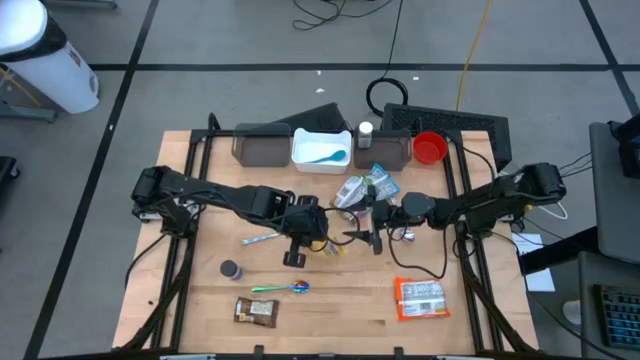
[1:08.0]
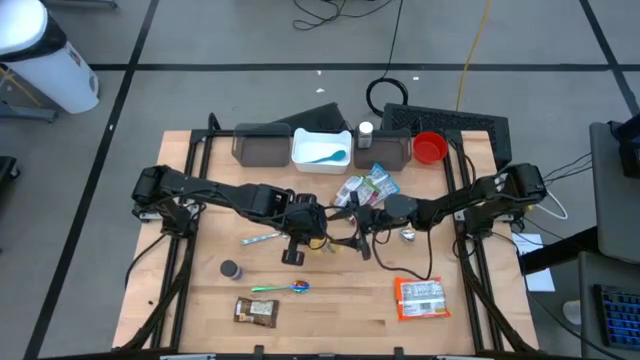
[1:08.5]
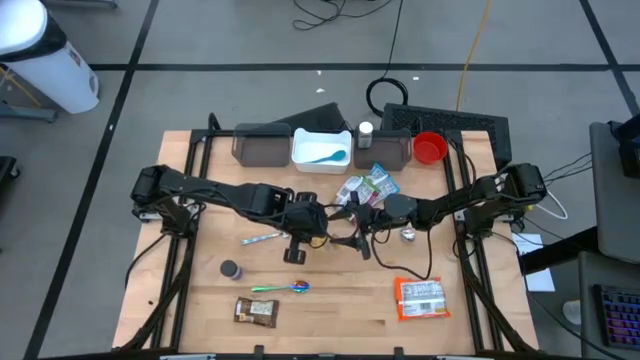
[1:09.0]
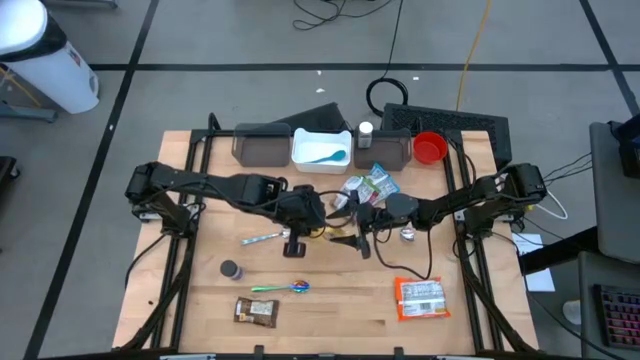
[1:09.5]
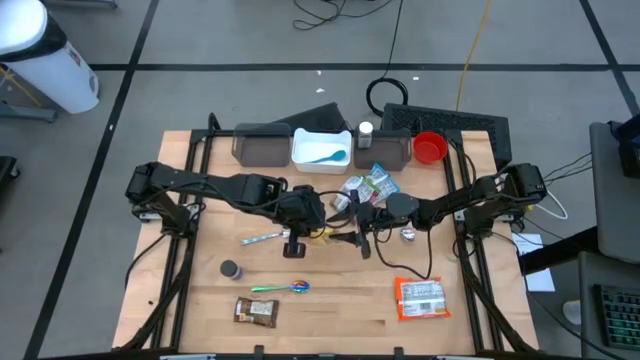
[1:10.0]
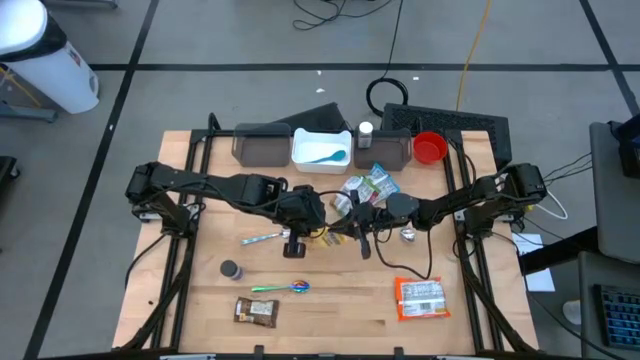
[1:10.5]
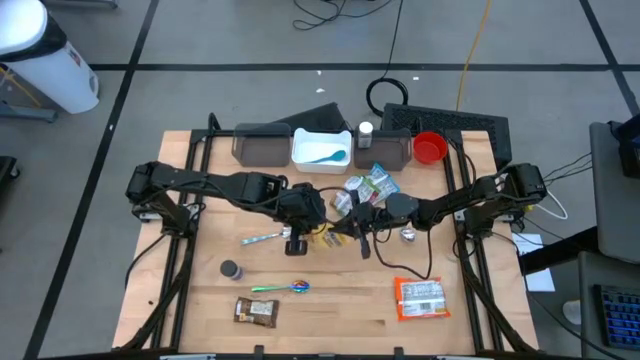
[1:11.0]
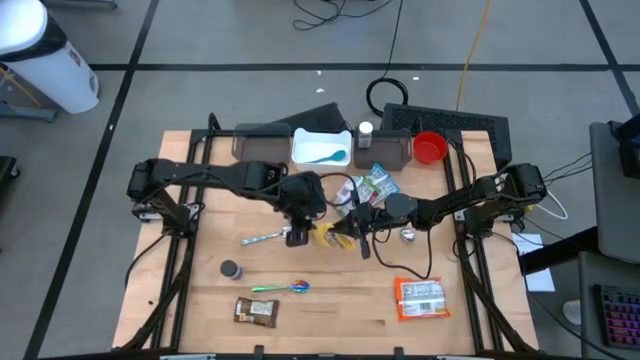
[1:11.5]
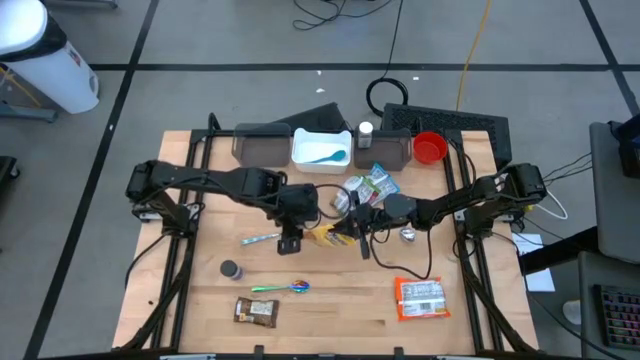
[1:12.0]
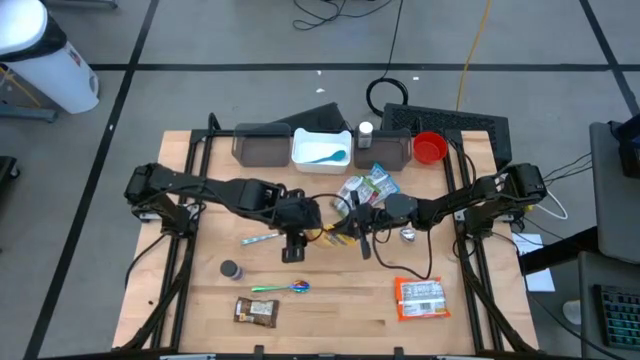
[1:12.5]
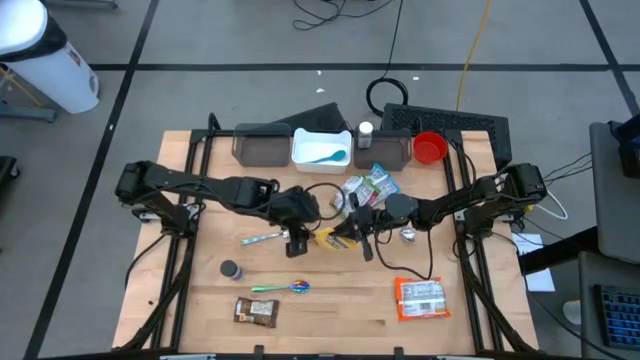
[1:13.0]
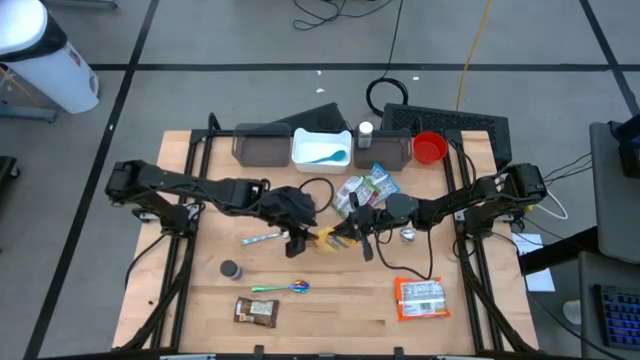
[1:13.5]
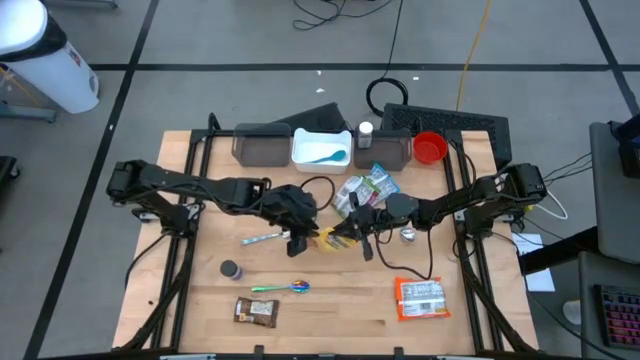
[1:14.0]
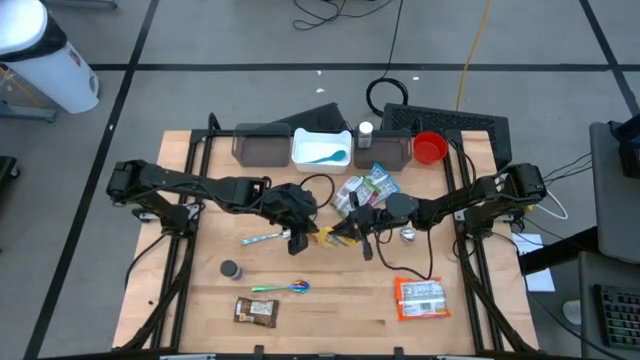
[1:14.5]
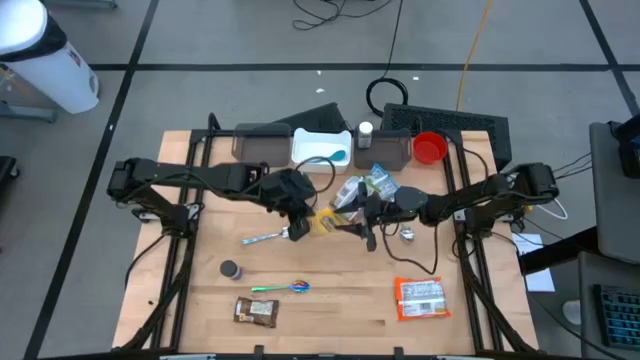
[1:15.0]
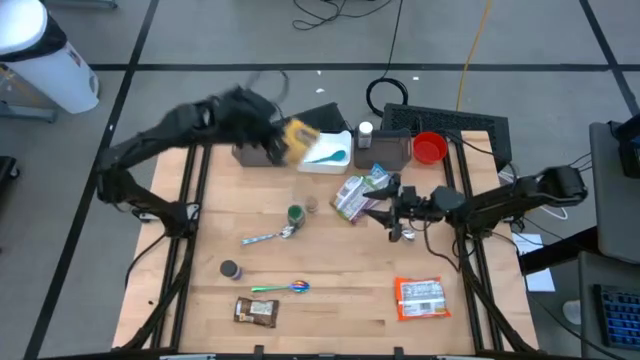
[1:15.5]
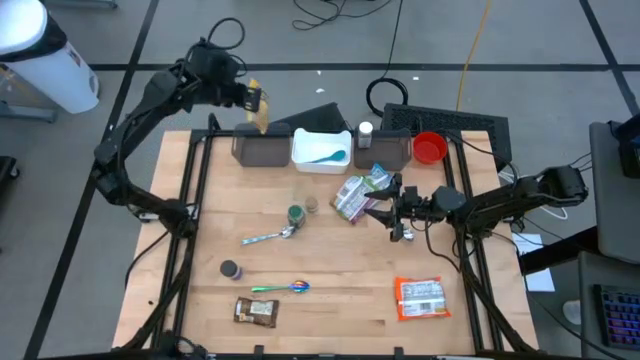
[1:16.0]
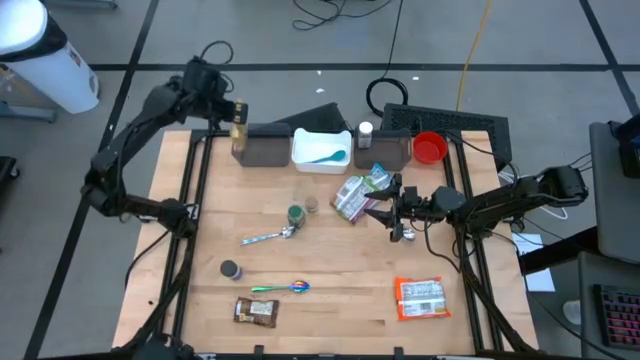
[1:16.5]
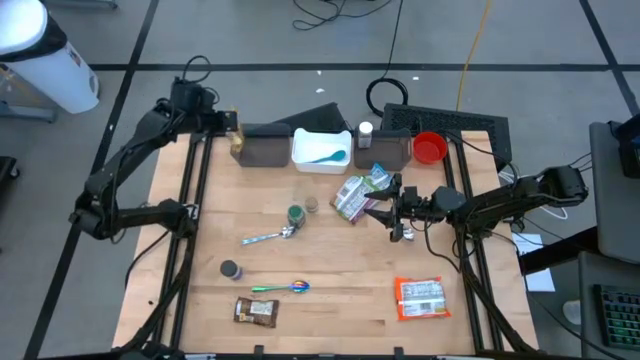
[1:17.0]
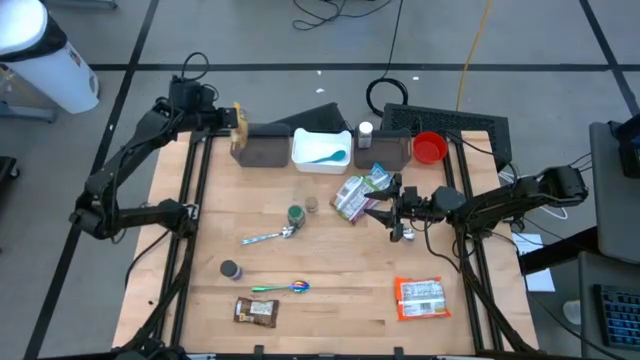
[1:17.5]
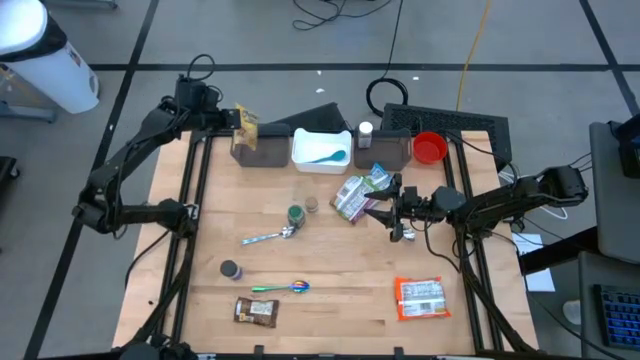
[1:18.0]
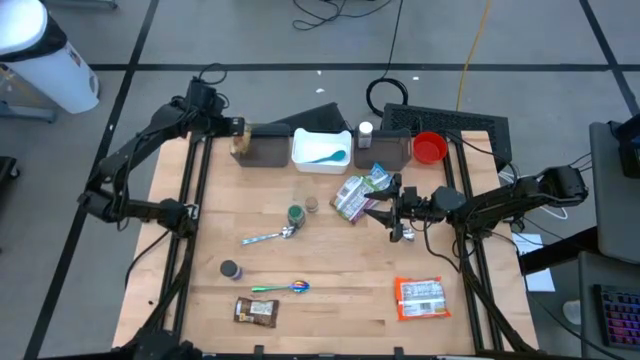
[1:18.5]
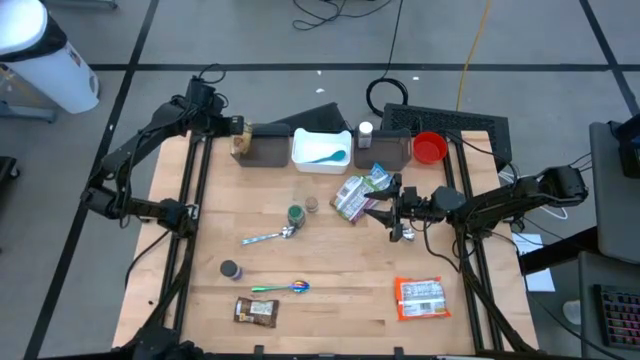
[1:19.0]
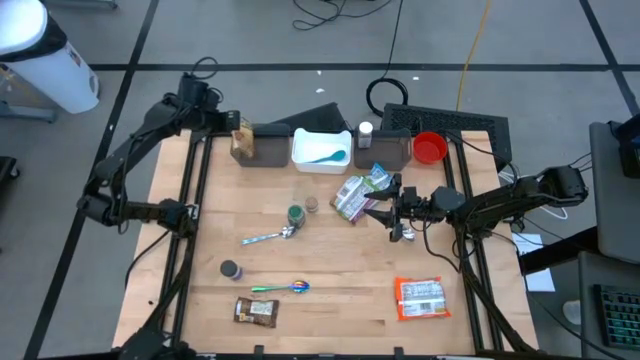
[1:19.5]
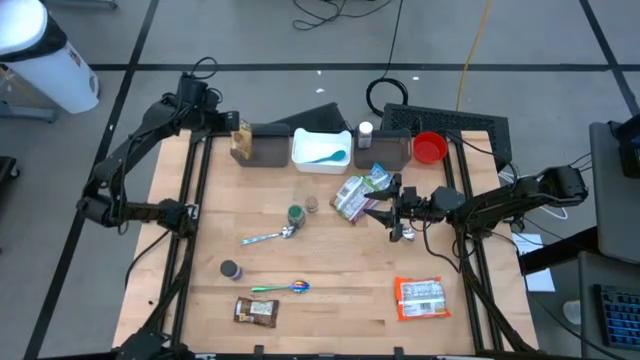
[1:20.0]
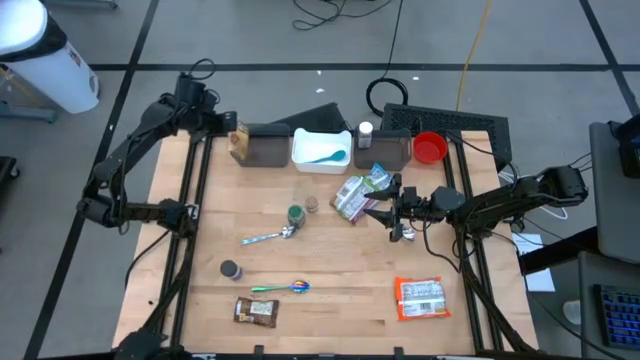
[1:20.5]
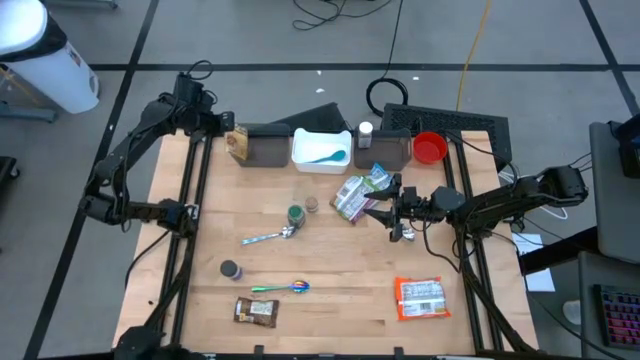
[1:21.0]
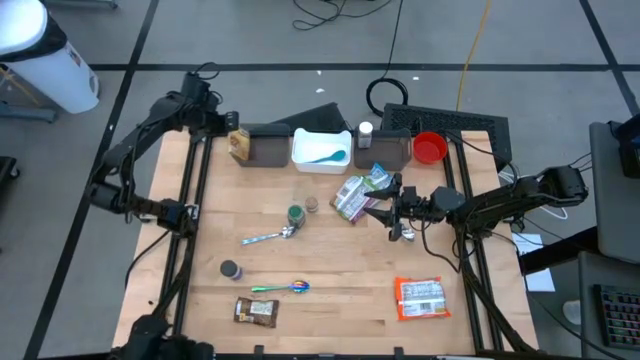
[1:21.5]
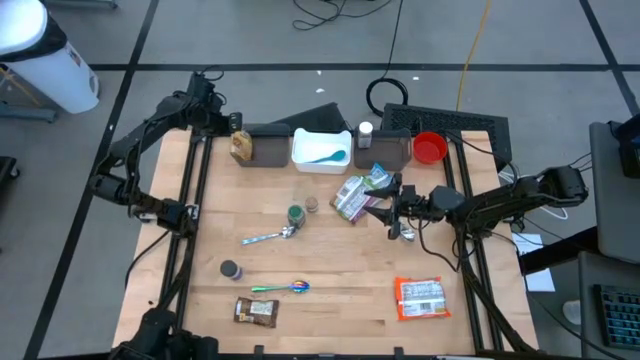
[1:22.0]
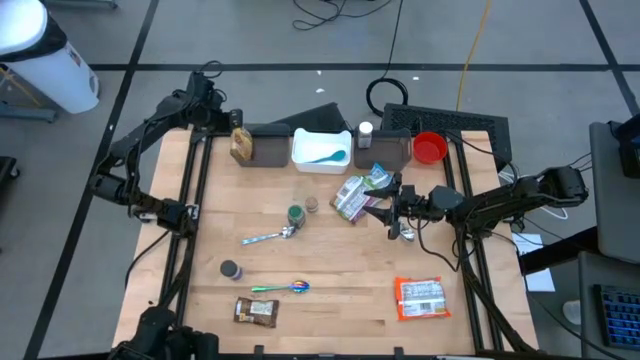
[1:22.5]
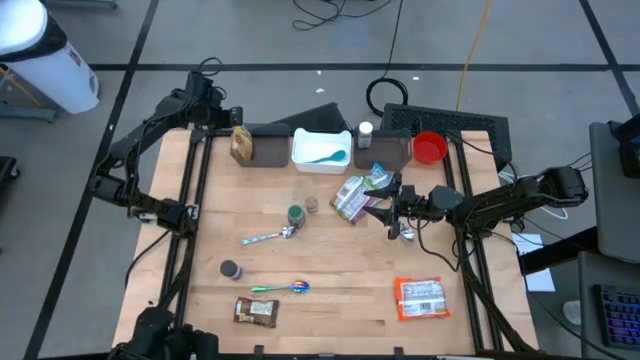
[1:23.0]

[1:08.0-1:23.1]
Task: Pick & Place Food Item
Put the yellow noodle pack into the left black bin

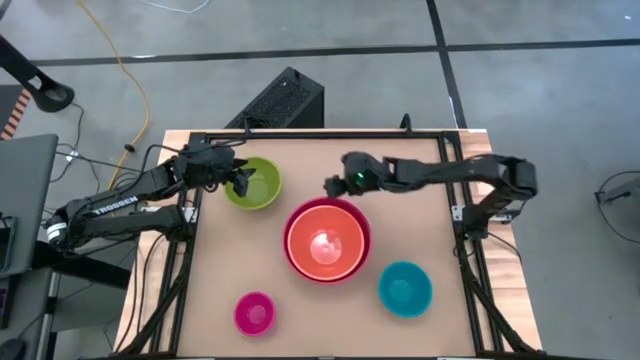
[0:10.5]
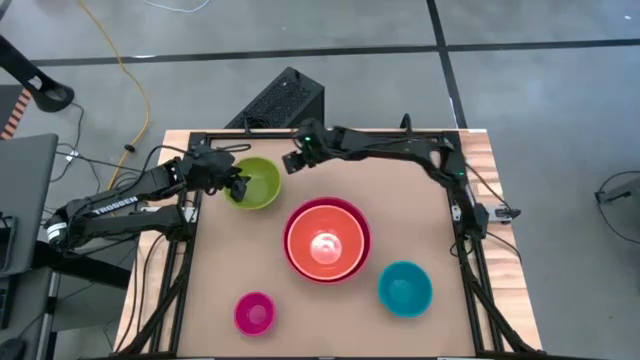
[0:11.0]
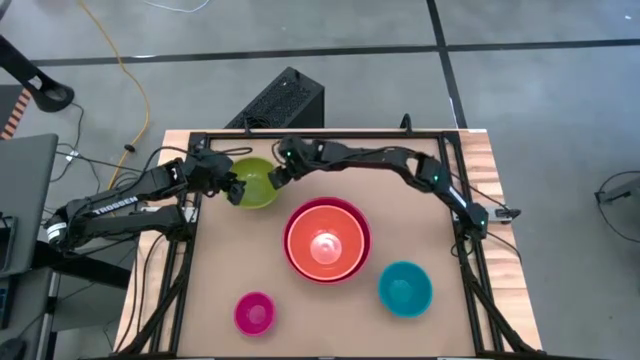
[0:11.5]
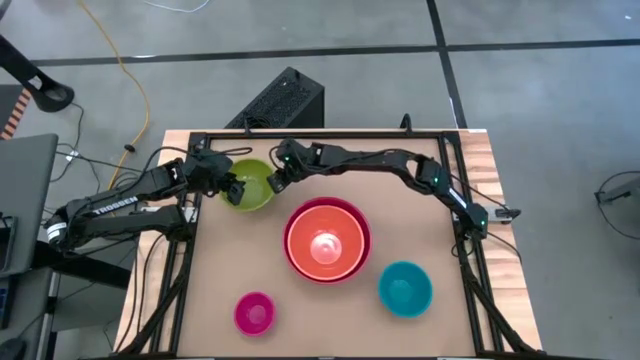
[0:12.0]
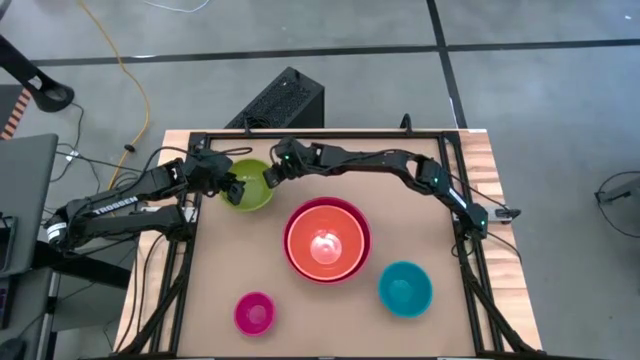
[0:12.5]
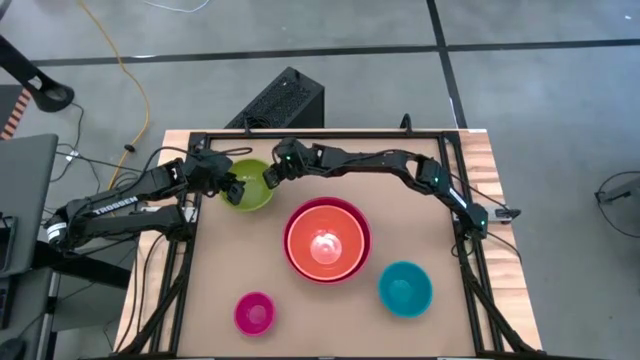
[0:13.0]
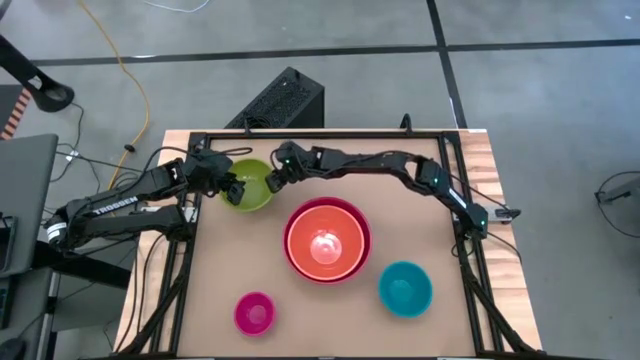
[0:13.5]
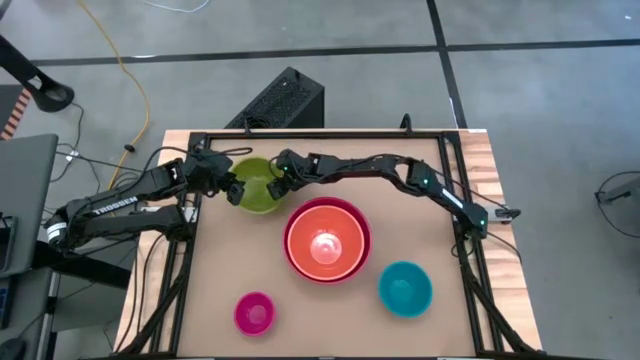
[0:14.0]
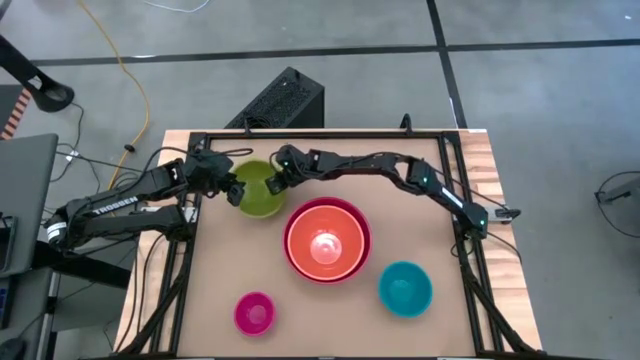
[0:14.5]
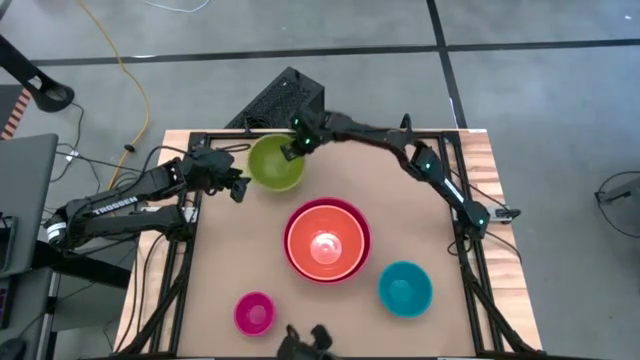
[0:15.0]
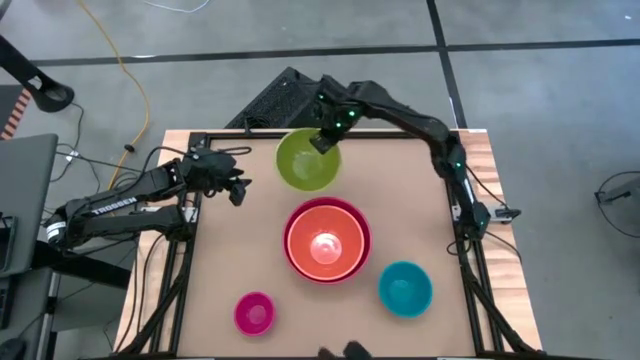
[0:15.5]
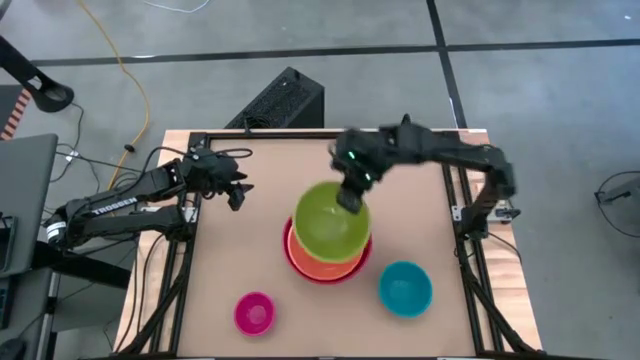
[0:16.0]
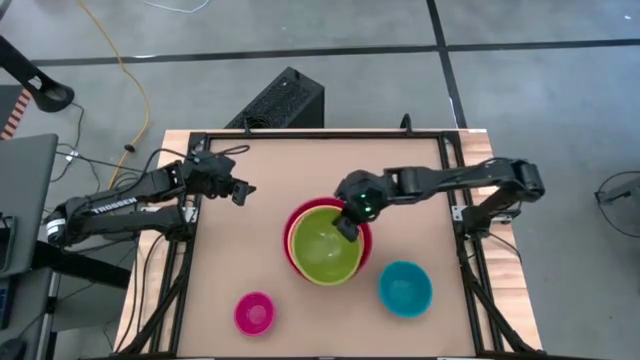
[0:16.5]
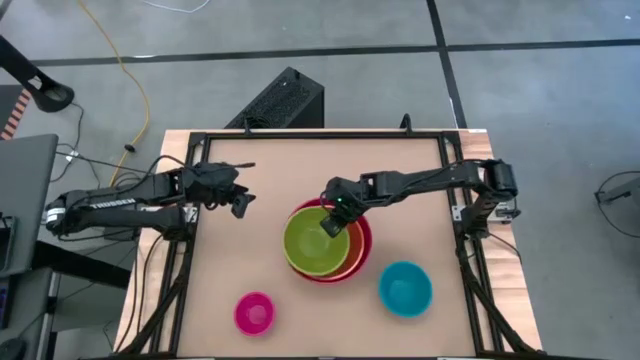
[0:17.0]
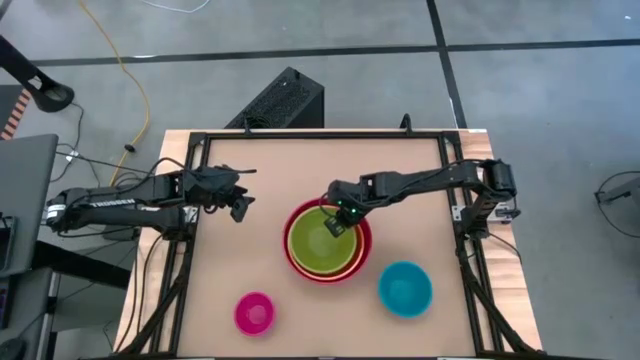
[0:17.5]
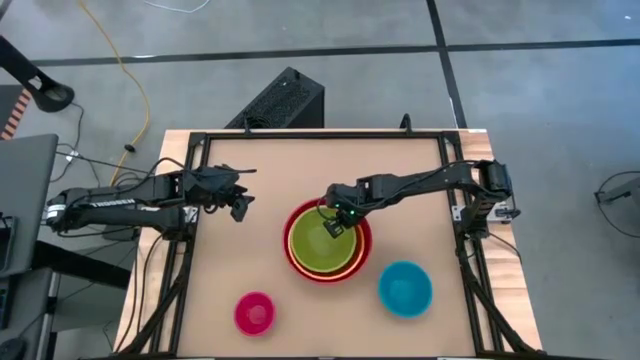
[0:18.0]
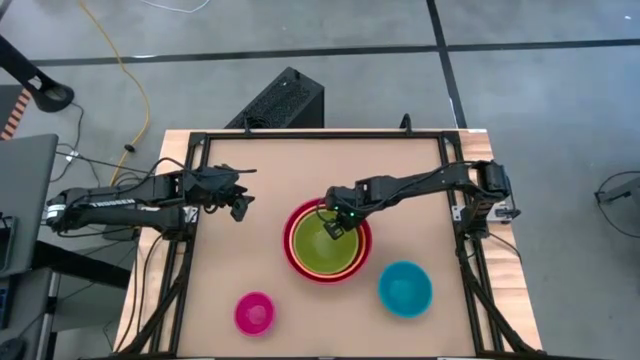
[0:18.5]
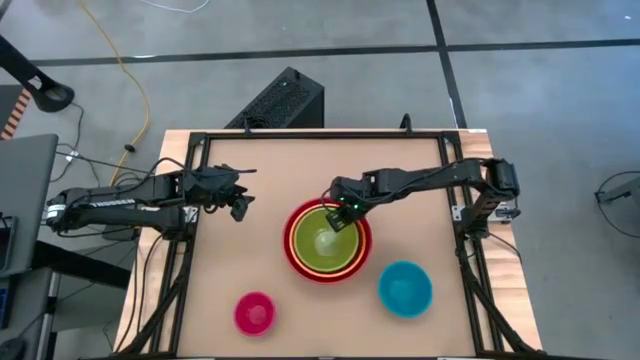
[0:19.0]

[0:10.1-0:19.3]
Task: Nest bowls inside each other by size order
Stack the green bowl on top of the orange bowl
